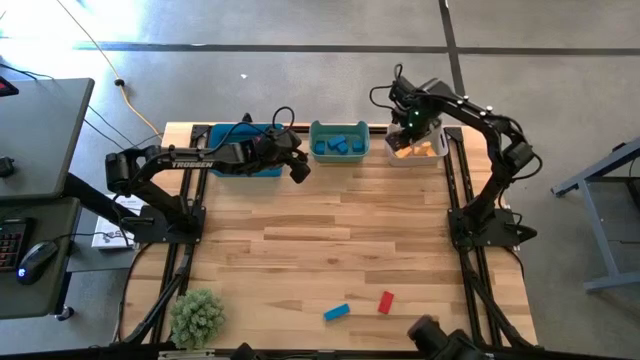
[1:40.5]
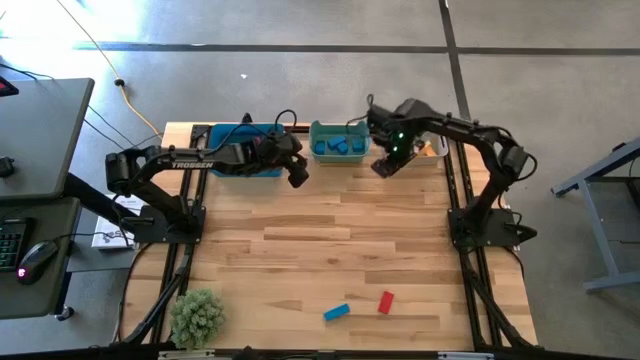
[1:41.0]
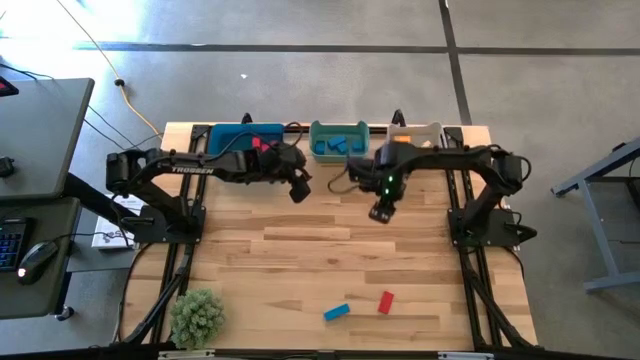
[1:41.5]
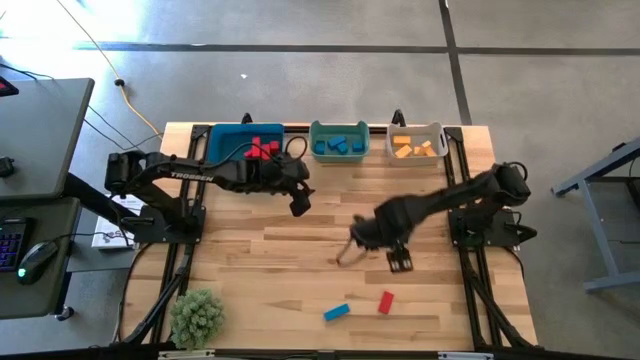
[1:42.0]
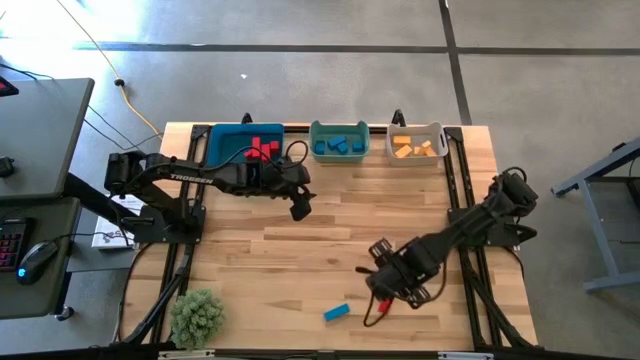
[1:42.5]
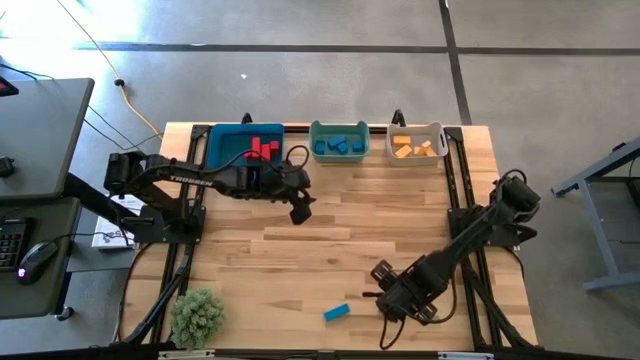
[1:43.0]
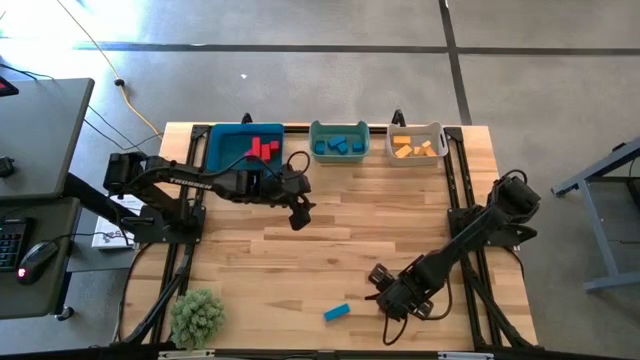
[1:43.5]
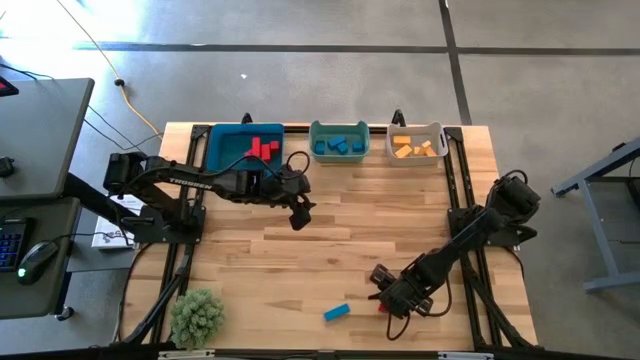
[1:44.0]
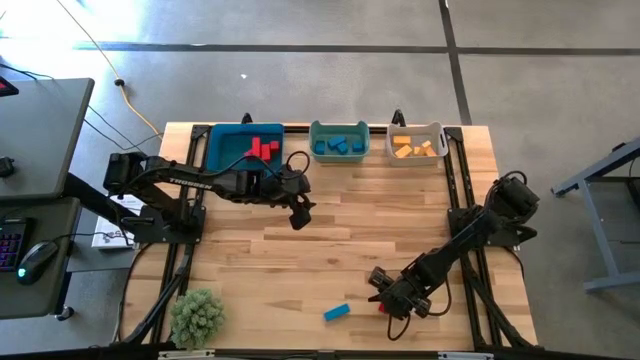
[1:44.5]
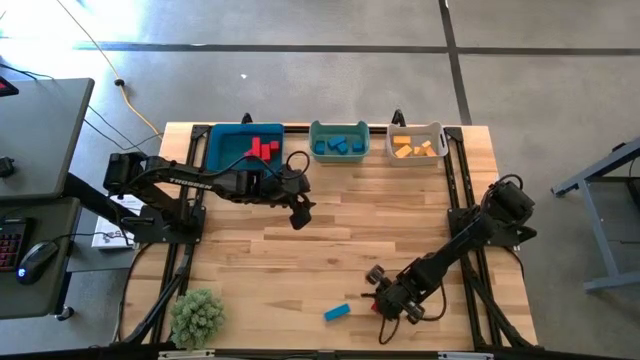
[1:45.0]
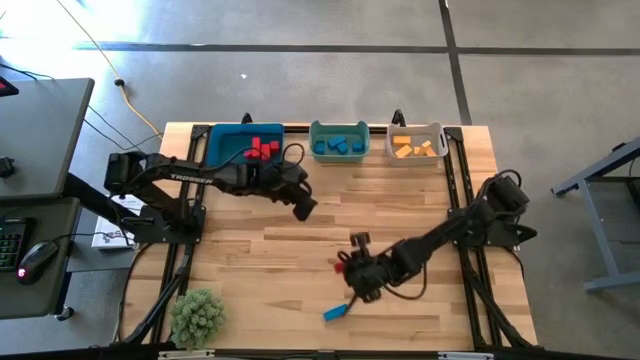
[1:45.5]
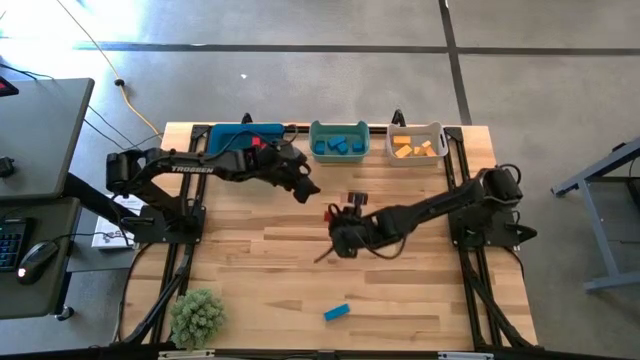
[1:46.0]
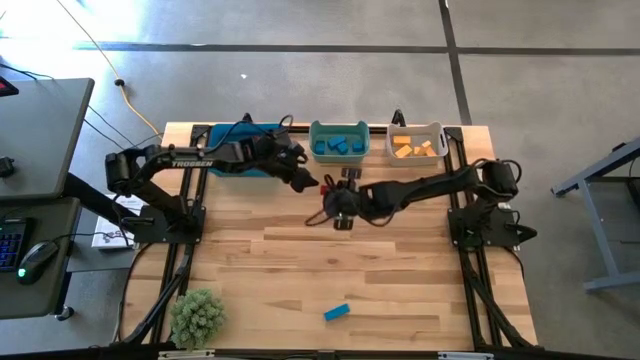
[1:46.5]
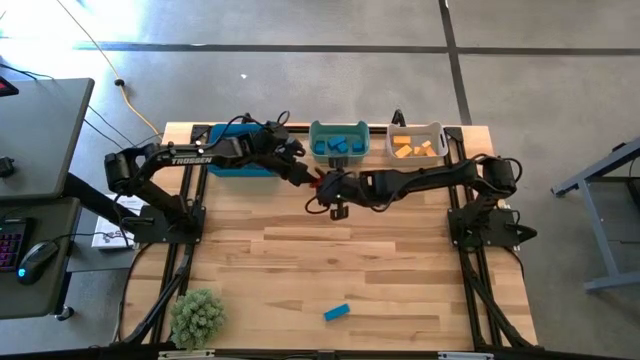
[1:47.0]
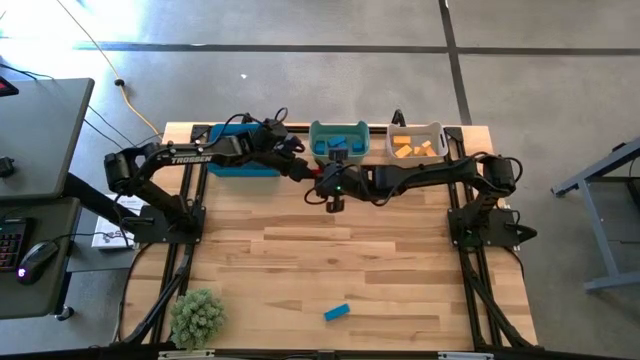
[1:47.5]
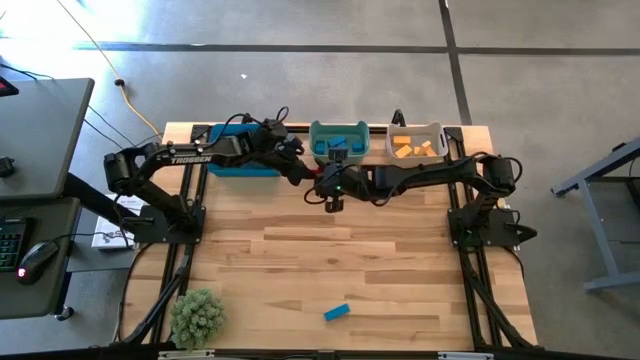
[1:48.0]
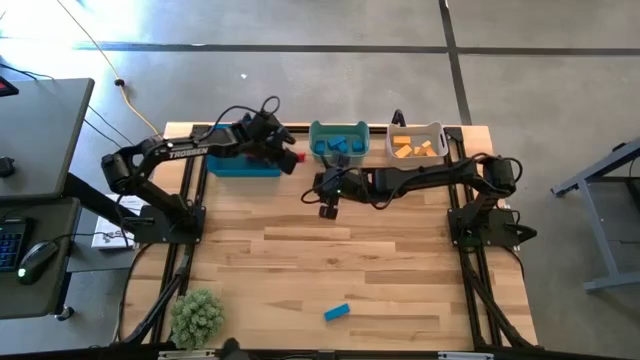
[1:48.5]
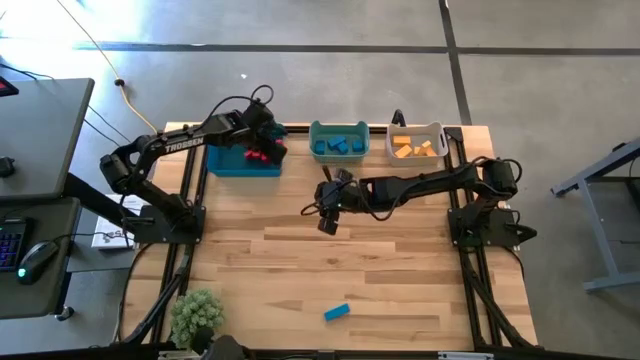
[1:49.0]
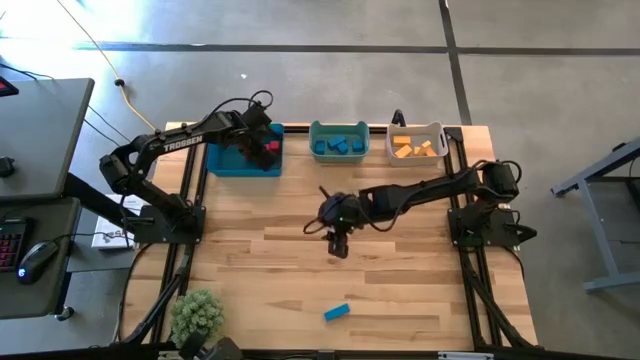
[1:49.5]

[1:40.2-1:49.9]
Task: Sort & place blocks by color
Put the red block into the blue bin

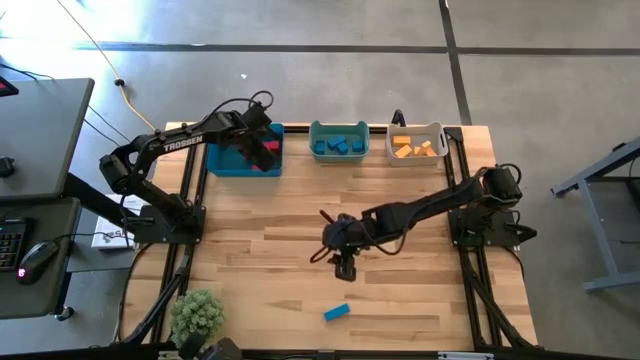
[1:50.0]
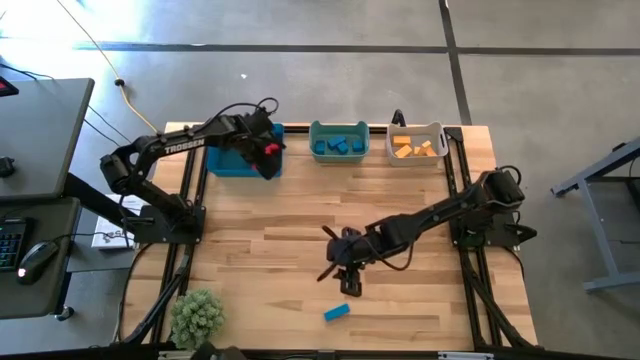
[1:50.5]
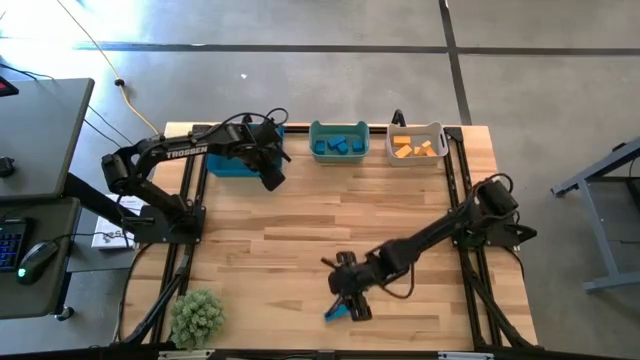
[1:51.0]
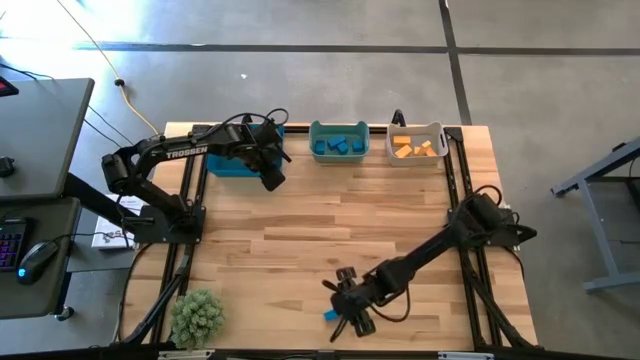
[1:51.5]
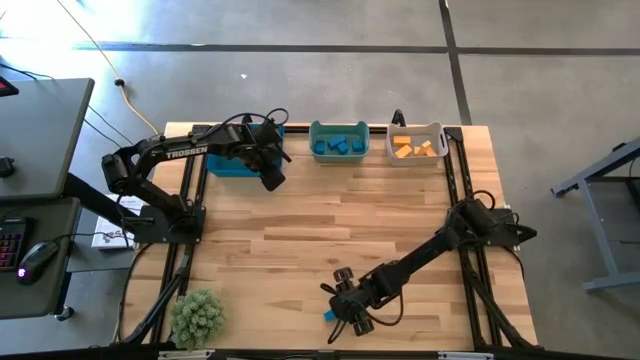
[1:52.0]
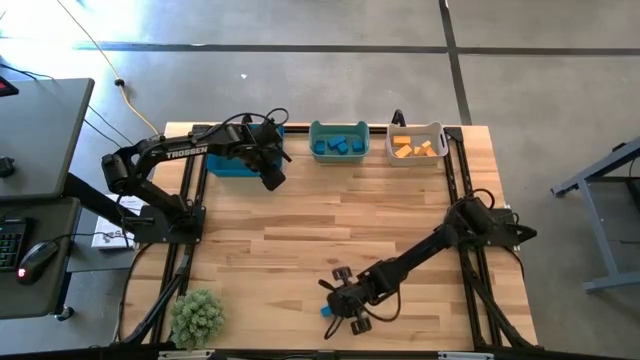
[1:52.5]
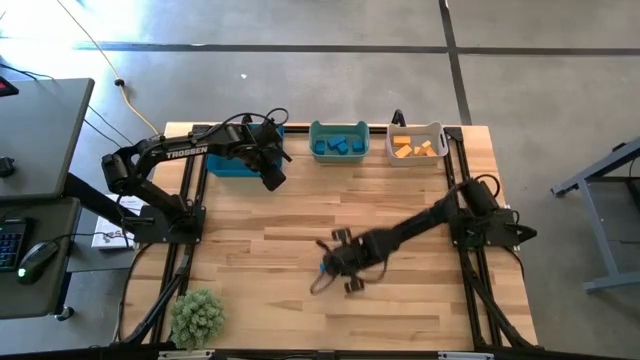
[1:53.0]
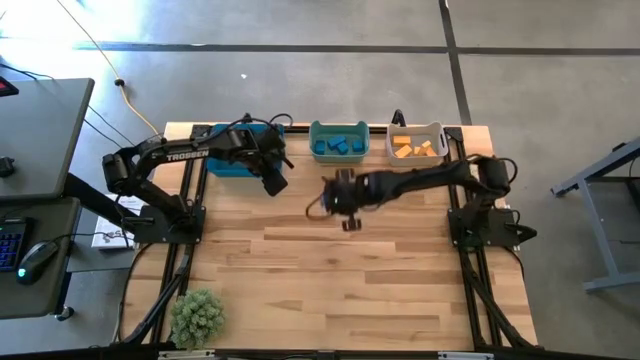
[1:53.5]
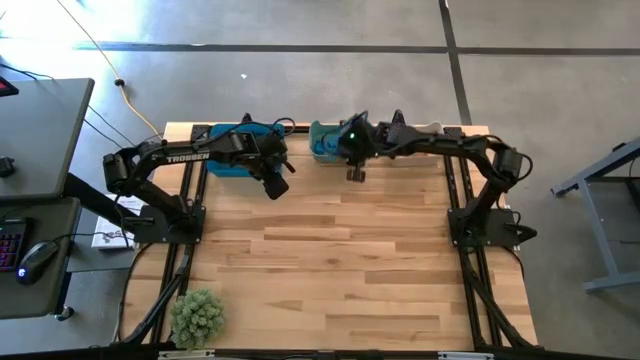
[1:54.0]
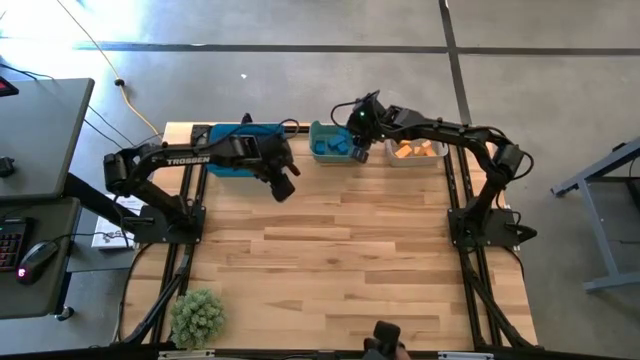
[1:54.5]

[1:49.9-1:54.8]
Put the blue block into the green bin

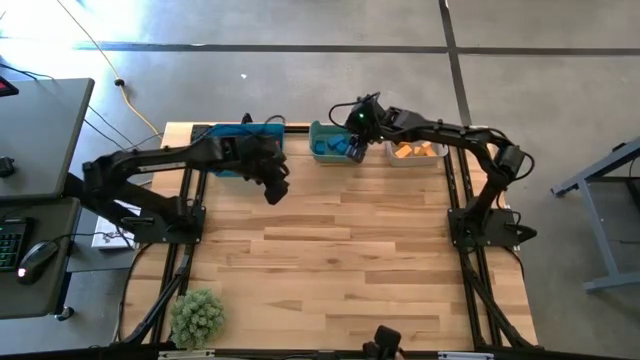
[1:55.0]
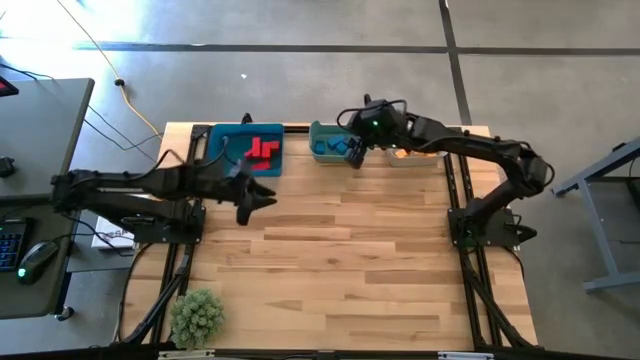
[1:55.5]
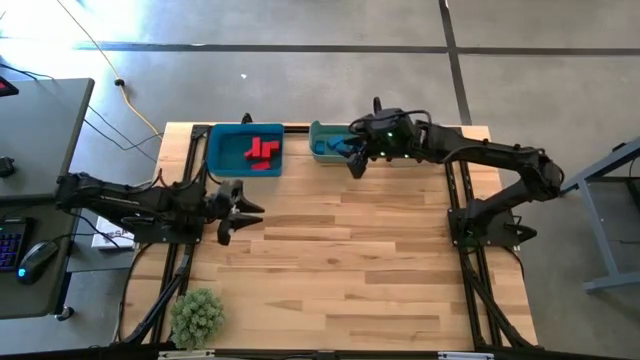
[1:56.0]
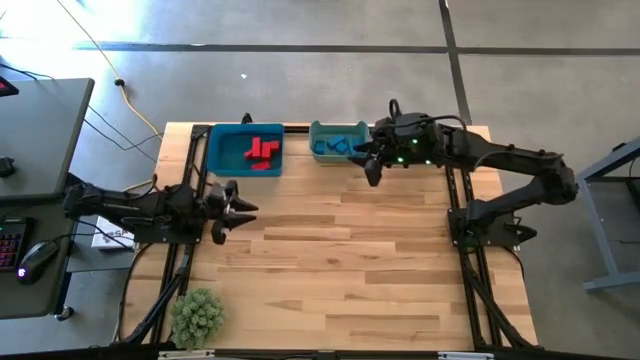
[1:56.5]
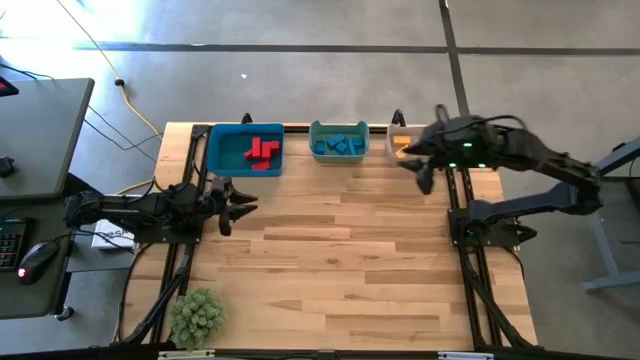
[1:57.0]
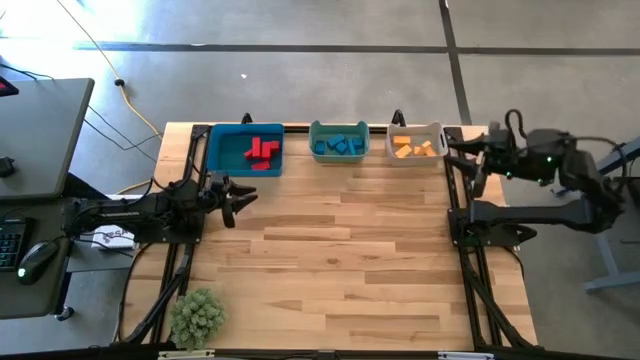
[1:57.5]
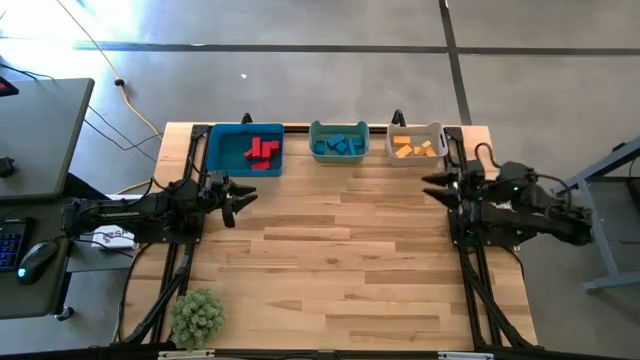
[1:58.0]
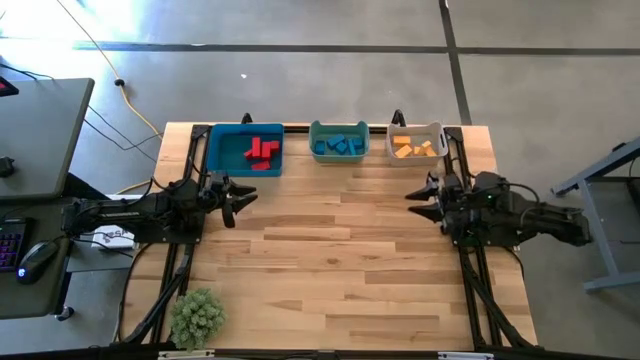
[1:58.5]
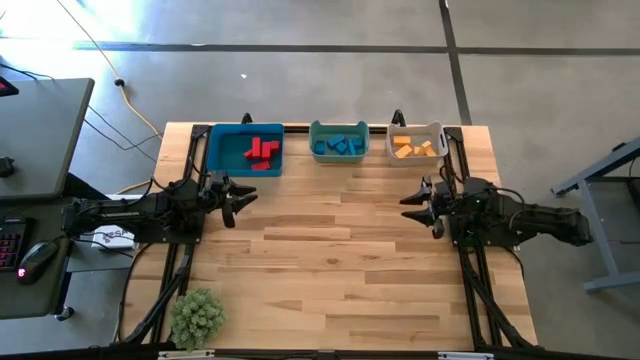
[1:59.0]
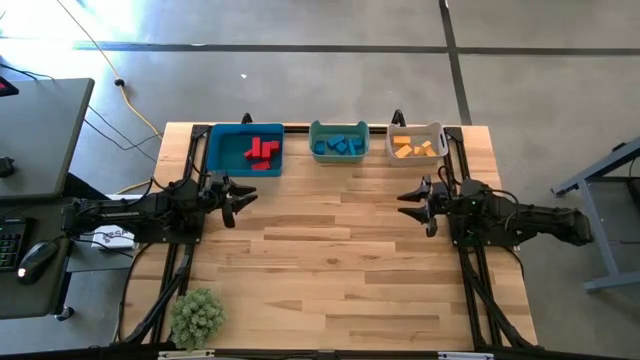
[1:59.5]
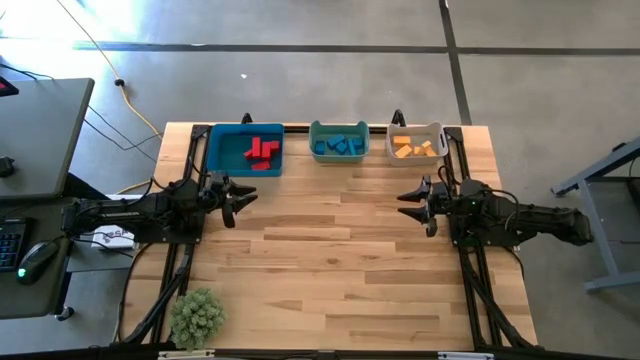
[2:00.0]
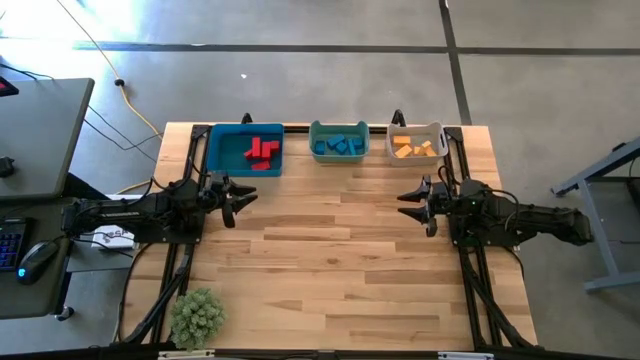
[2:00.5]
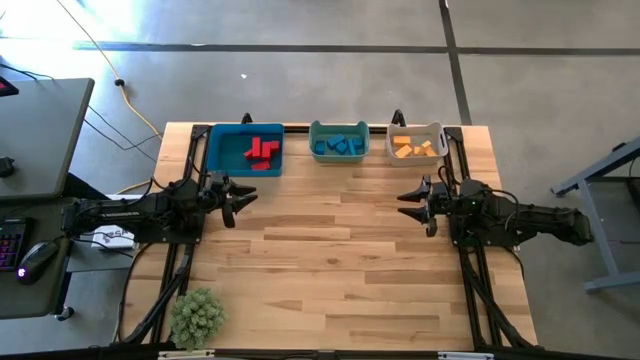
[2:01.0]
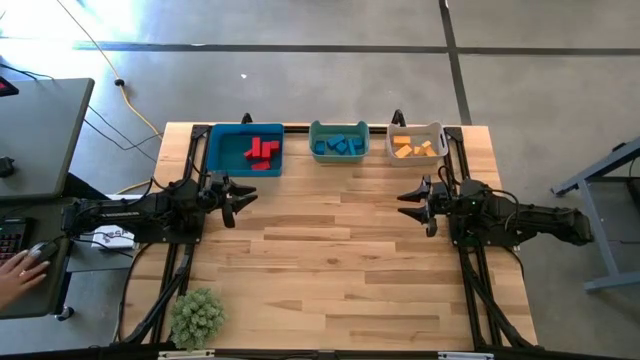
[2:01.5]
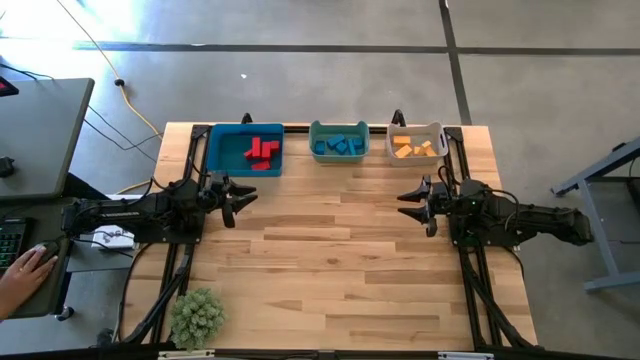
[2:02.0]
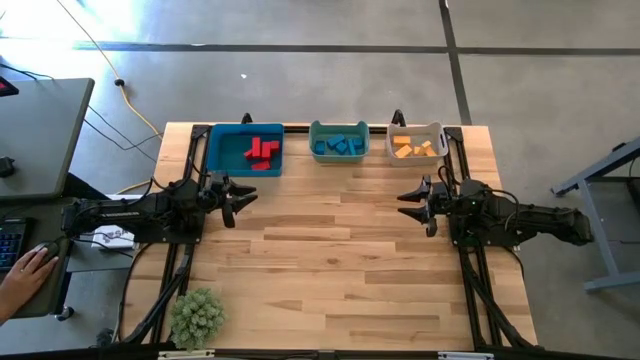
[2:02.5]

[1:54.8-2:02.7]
Return to Home Position
